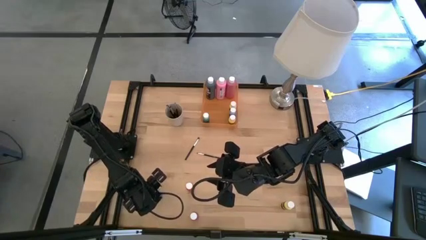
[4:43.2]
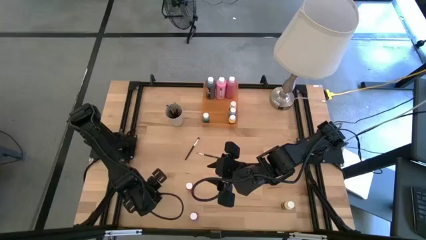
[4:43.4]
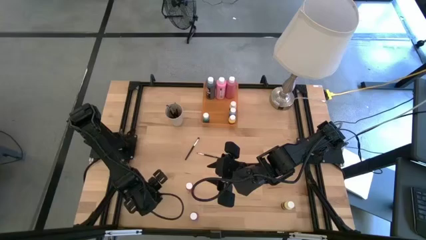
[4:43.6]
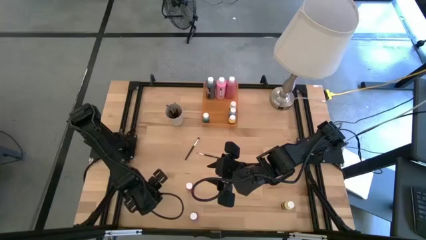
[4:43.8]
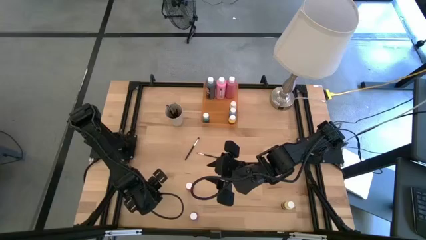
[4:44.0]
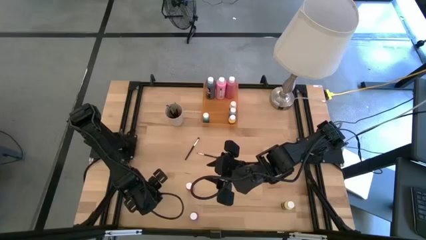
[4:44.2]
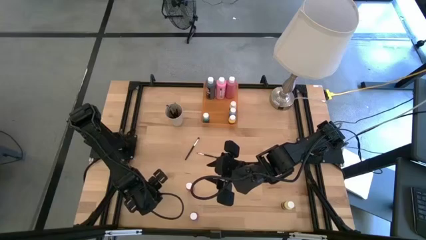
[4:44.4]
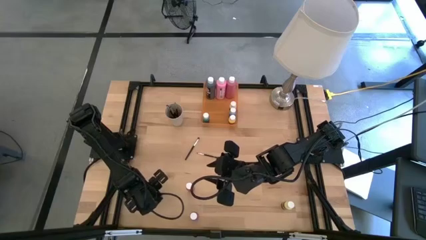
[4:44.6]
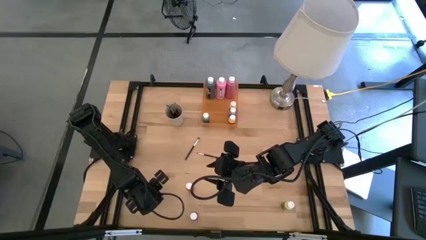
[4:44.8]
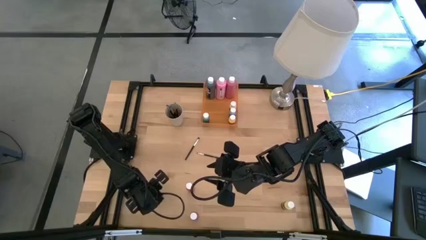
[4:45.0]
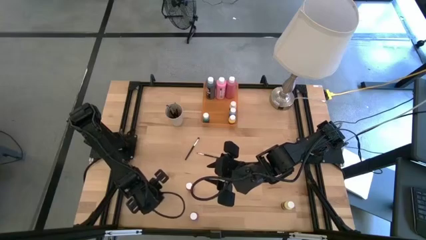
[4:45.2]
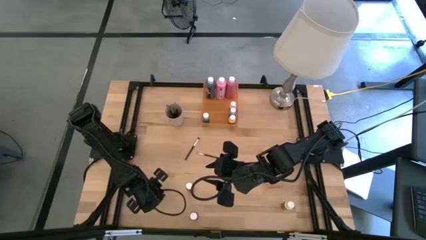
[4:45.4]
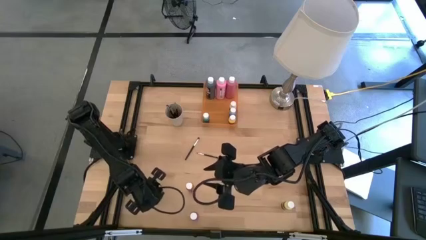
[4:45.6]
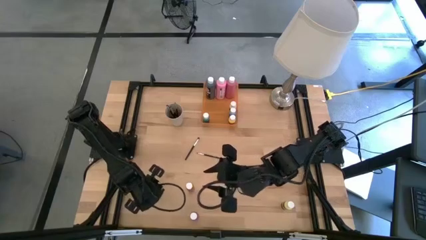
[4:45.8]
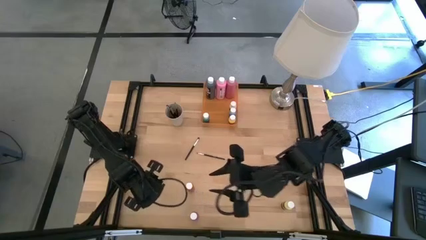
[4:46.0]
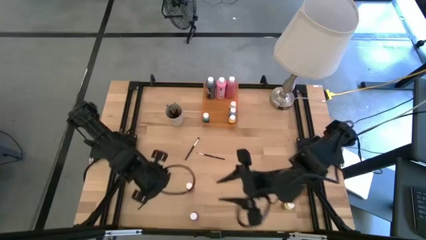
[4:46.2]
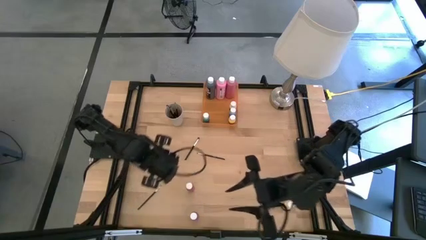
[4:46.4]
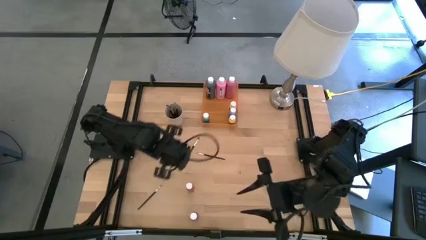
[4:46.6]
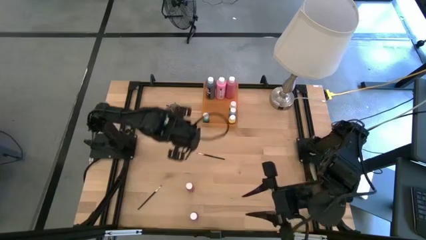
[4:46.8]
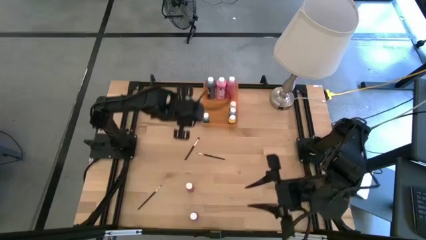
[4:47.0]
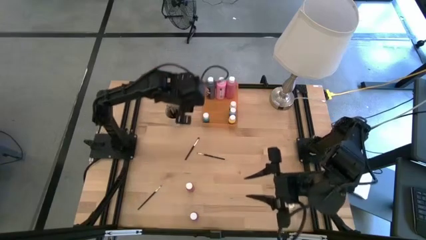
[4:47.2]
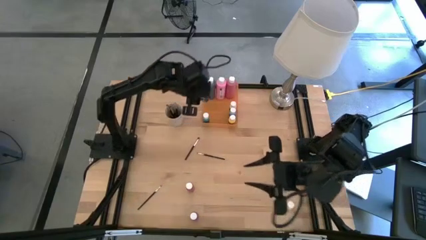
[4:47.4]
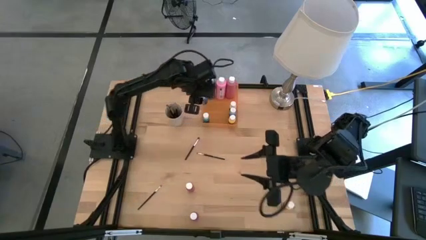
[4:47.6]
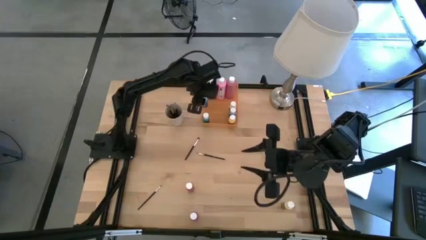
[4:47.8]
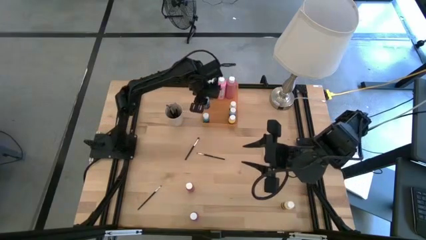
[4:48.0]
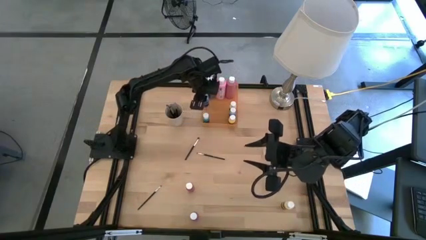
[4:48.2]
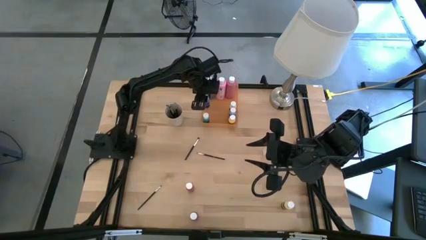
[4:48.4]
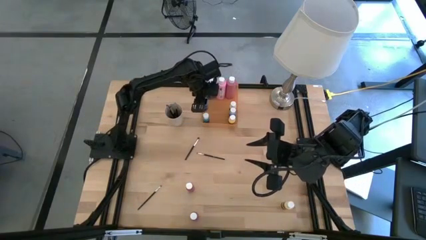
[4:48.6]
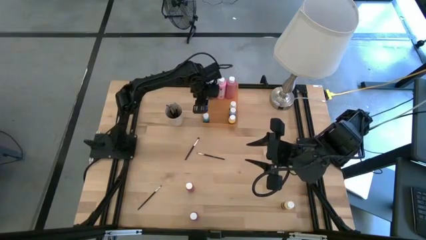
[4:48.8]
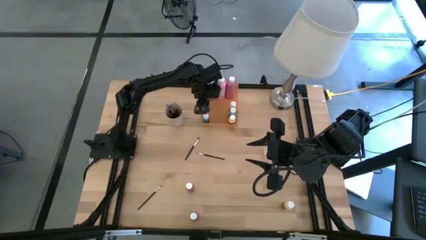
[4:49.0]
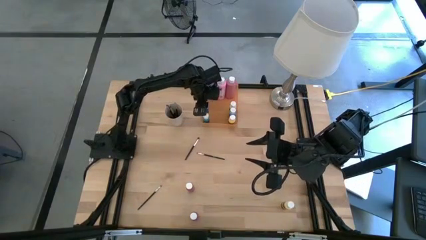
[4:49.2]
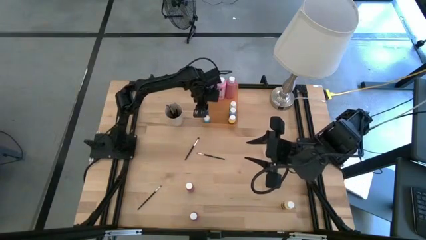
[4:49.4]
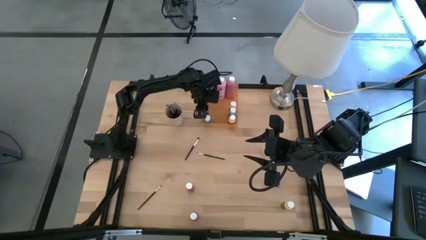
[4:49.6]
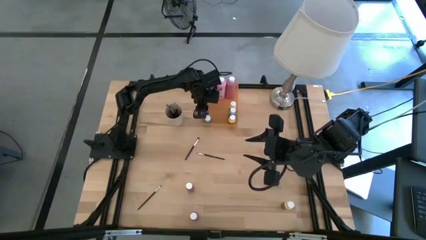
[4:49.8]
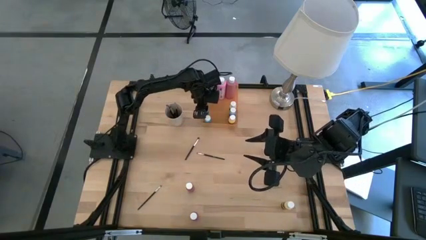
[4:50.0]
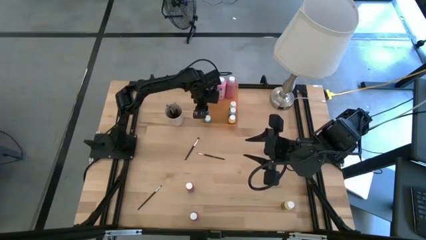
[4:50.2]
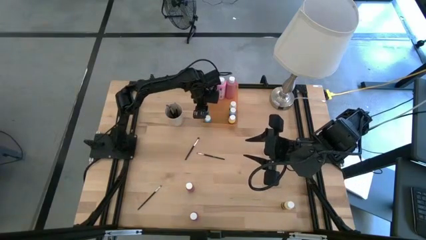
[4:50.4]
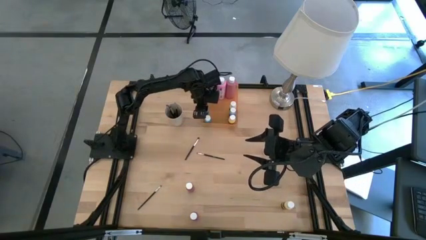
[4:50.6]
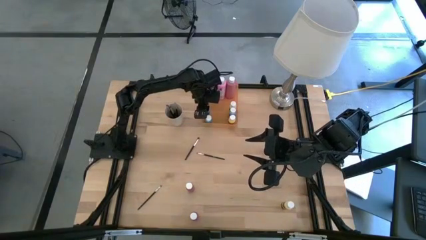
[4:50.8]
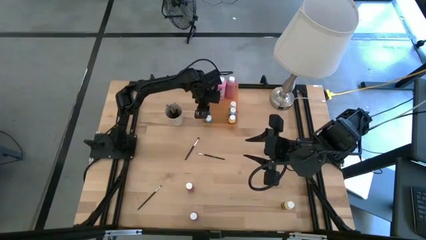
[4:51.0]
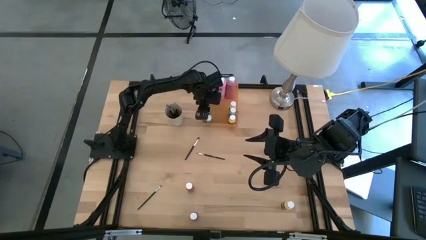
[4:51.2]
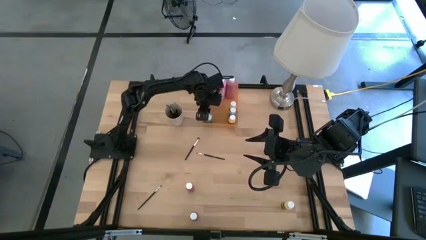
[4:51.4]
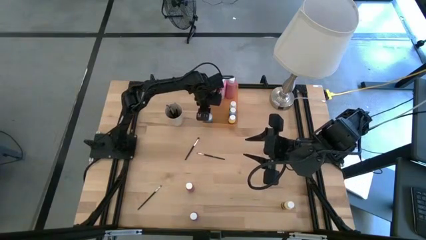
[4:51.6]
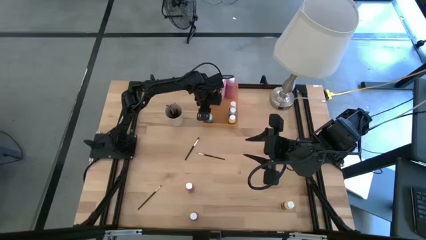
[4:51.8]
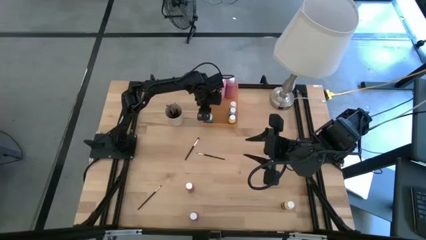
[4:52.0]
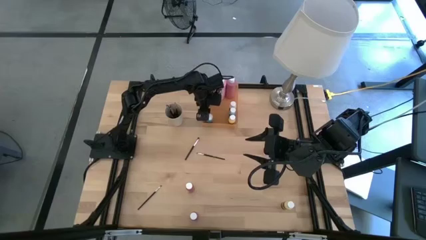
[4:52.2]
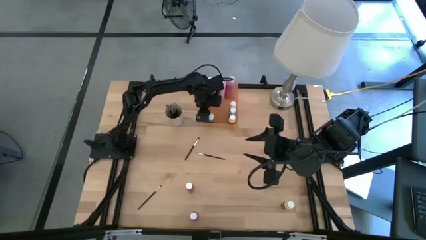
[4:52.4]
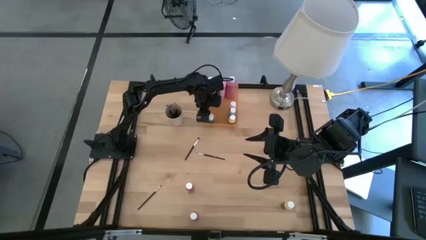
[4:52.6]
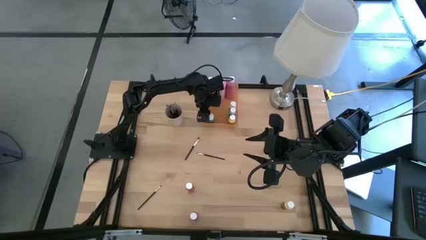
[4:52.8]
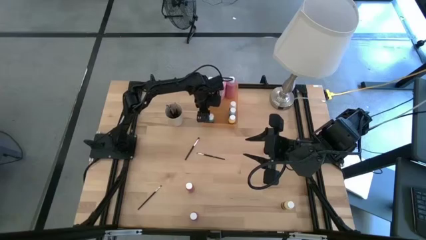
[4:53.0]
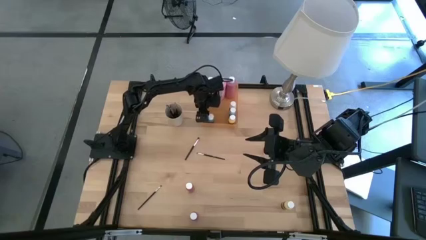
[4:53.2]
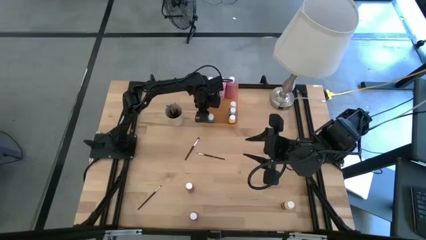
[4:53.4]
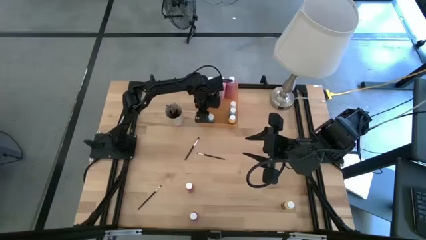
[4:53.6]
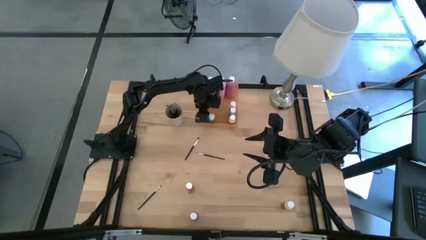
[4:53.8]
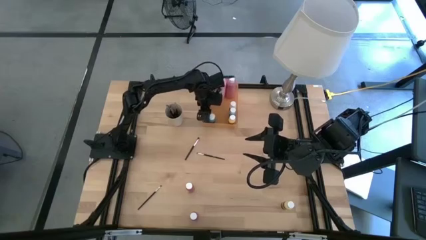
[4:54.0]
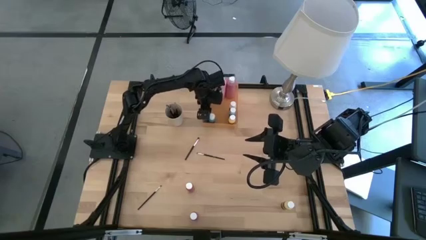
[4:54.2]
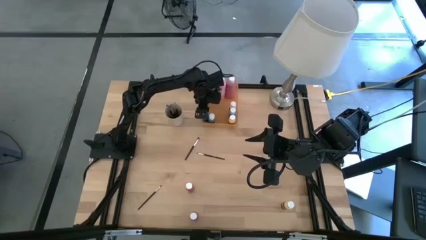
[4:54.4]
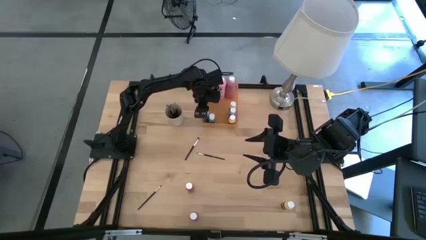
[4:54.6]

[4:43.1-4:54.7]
Task: Pick & Place Paint Supplies
Put the blue paint bottle into the orange bin

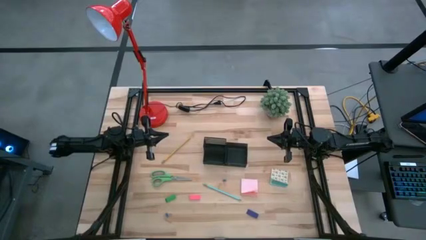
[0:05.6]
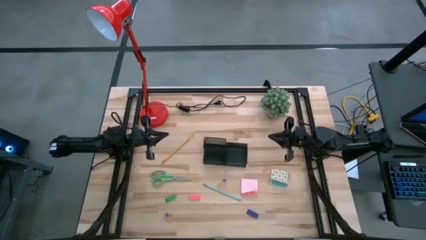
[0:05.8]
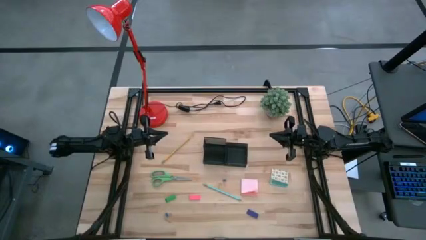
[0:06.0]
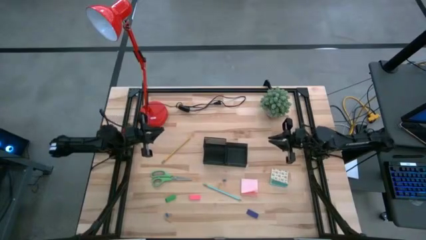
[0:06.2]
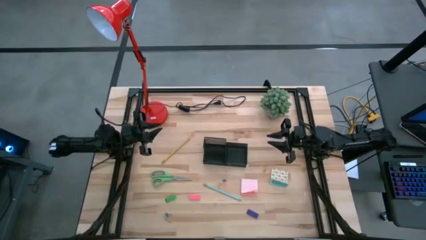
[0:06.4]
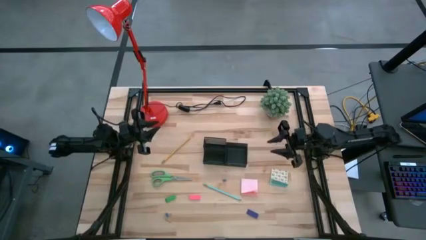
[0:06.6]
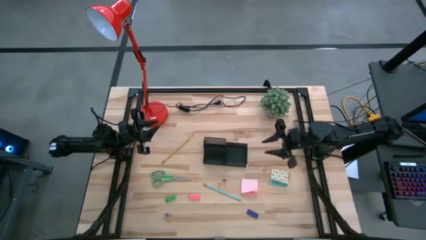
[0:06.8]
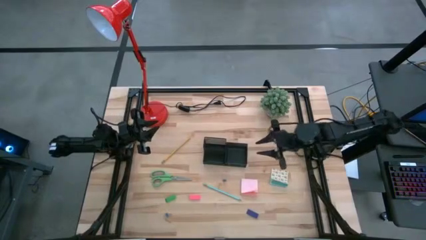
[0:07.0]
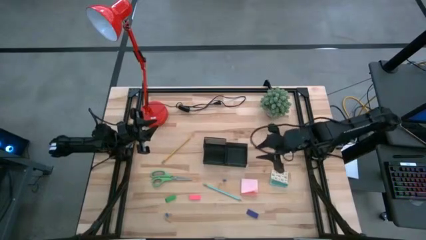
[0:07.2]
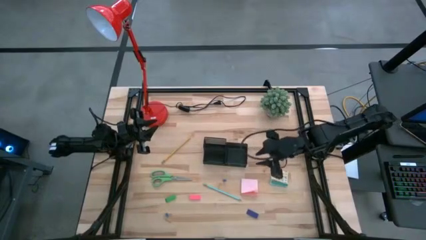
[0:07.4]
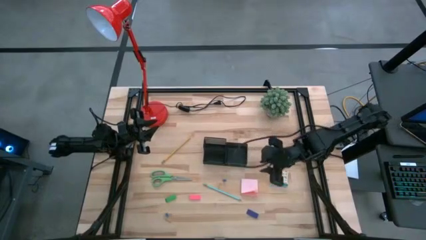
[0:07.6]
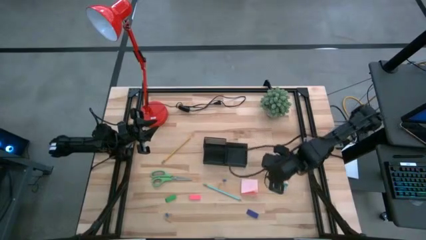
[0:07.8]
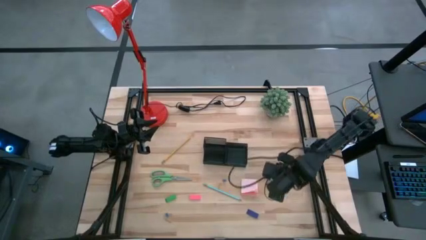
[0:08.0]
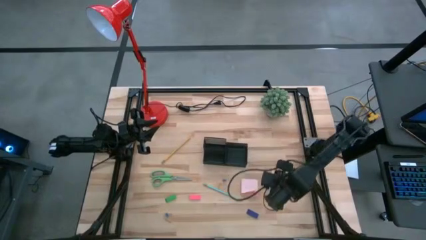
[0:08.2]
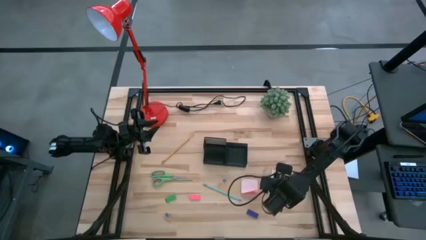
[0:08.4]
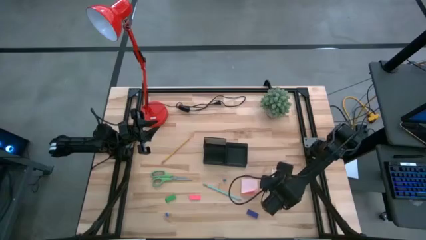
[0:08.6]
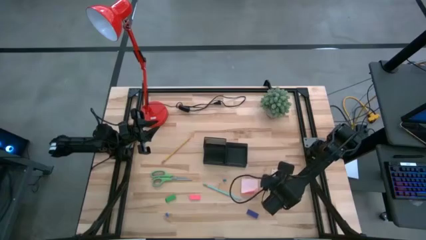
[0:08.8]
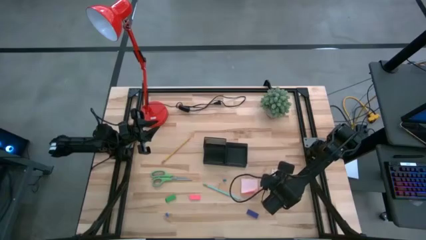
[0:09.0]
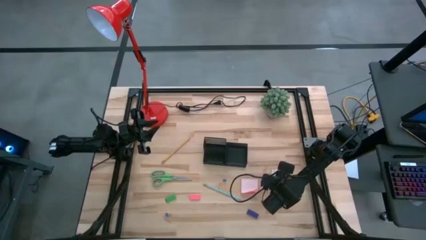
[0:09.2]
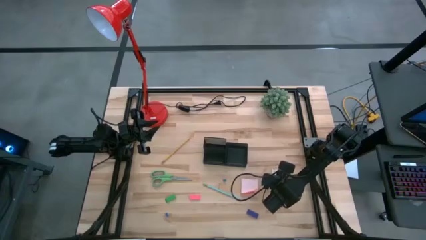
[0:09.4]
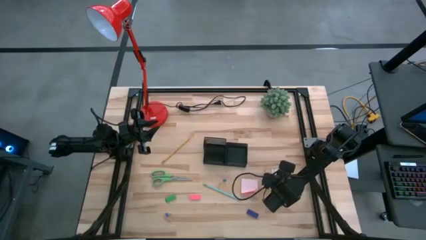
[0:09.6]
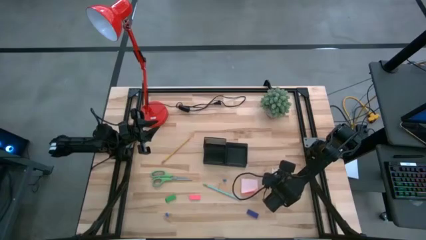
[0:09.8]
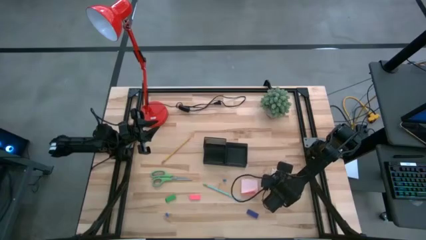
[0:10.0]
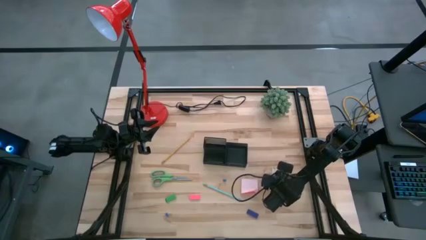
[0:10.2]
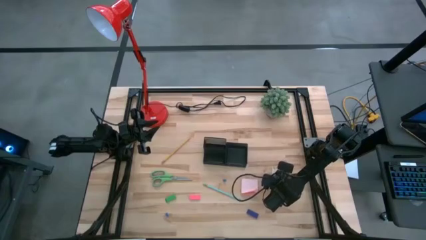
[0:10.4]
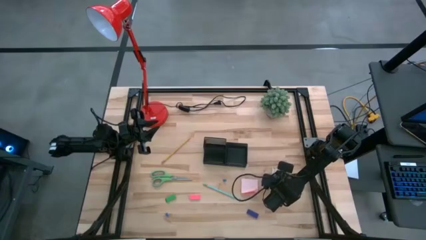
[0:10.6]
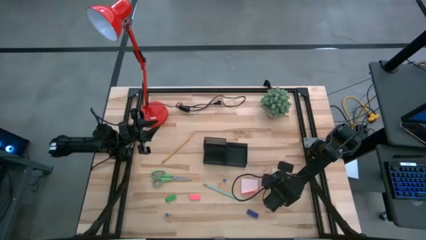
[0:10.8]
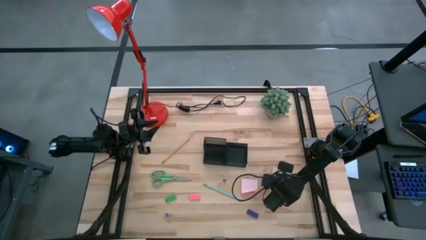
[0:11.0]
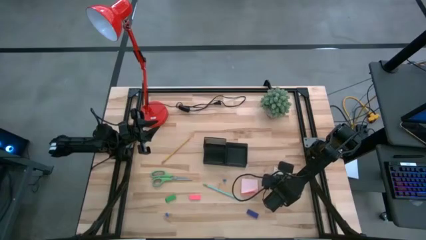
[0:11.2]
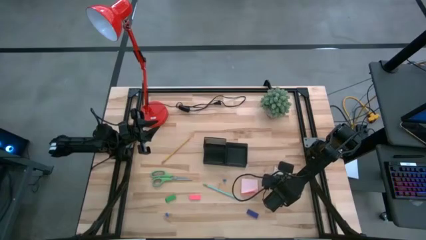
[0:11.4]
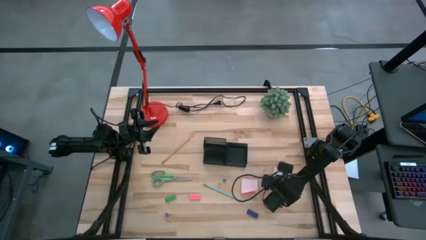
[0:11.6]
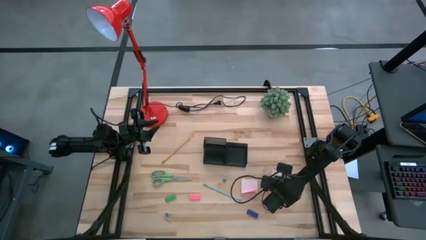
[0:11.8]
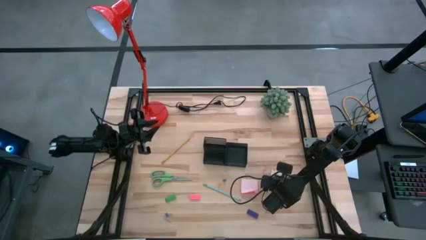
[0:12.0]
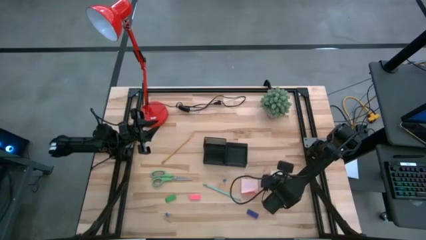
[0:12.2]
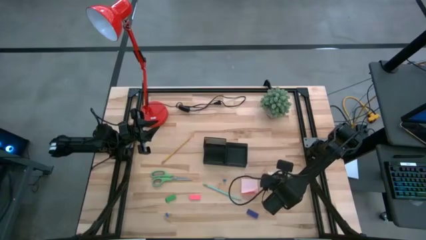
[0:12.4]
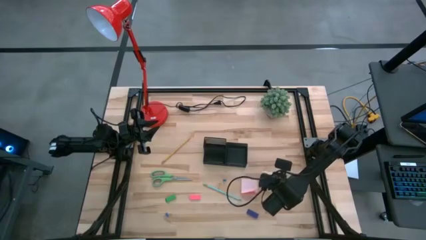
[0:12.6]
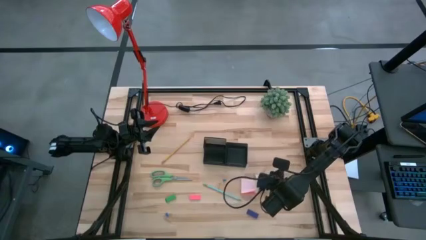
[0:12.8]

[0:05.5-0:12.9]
Task: Pick and place office supplies into organizer
Put the green sticky notes into the black desk organizer
